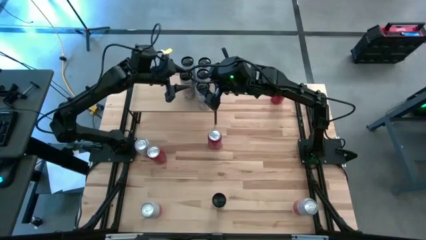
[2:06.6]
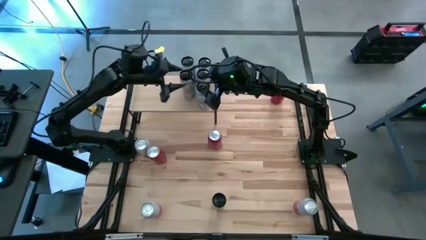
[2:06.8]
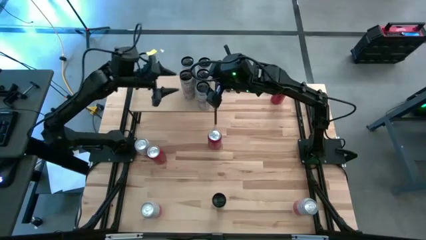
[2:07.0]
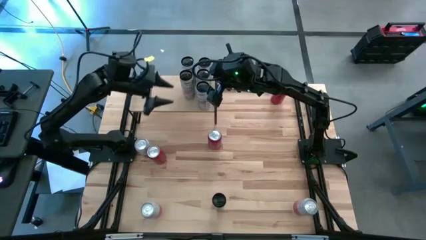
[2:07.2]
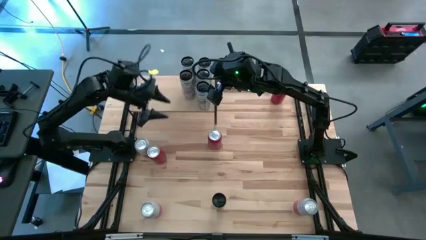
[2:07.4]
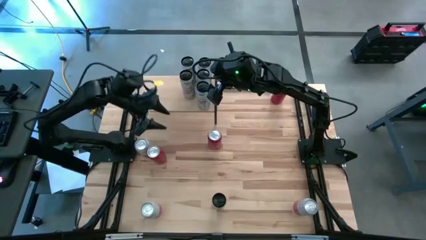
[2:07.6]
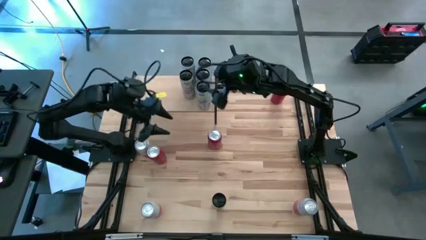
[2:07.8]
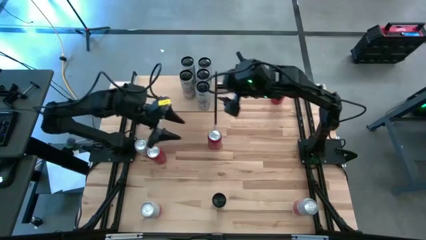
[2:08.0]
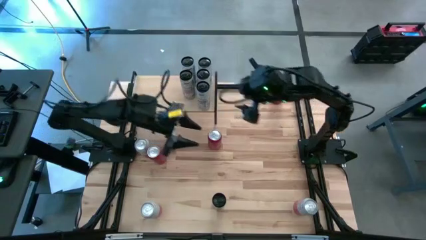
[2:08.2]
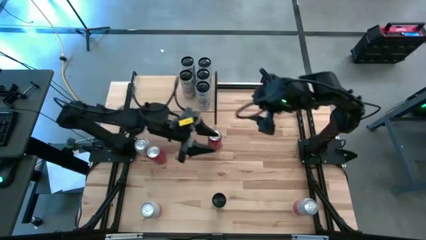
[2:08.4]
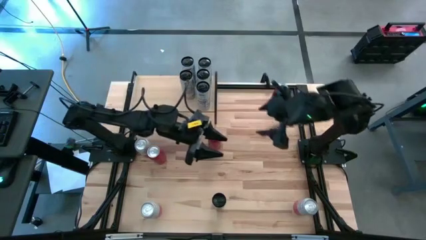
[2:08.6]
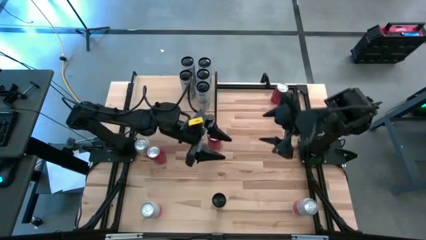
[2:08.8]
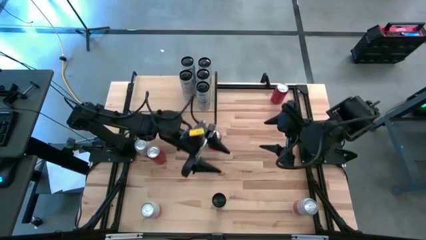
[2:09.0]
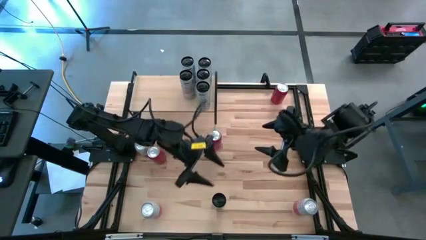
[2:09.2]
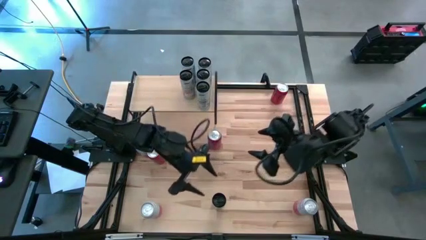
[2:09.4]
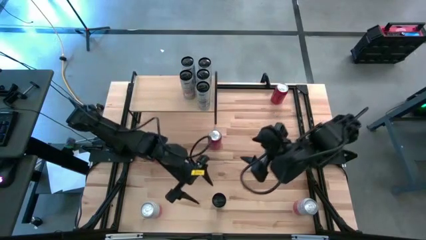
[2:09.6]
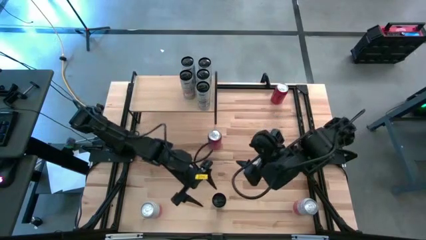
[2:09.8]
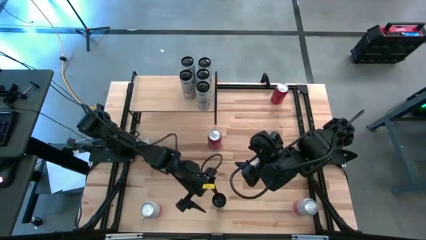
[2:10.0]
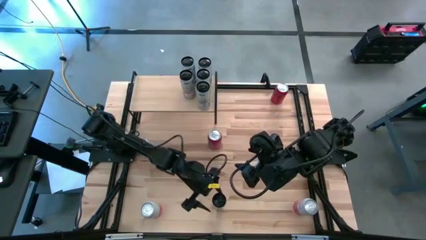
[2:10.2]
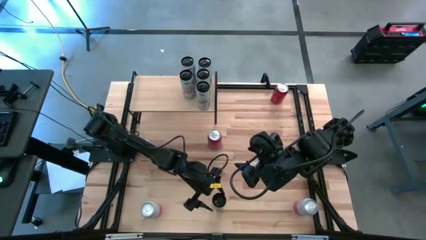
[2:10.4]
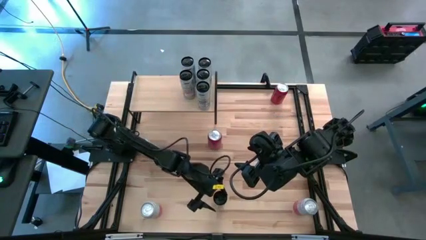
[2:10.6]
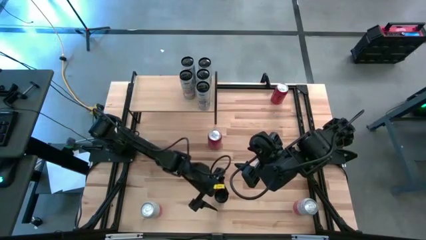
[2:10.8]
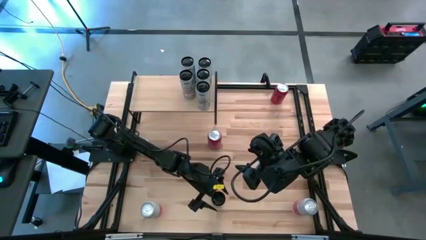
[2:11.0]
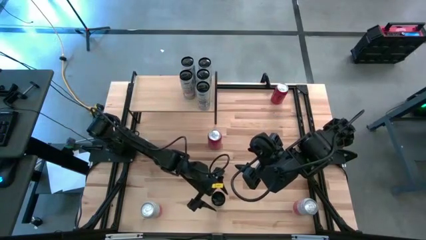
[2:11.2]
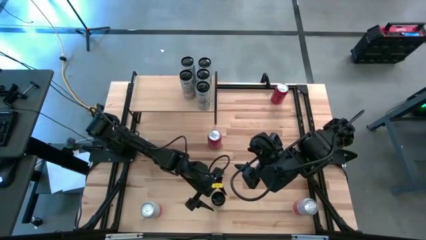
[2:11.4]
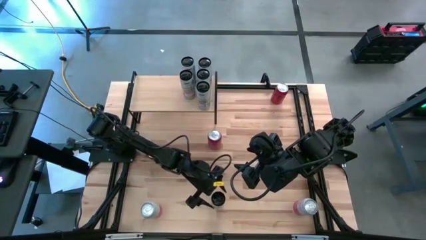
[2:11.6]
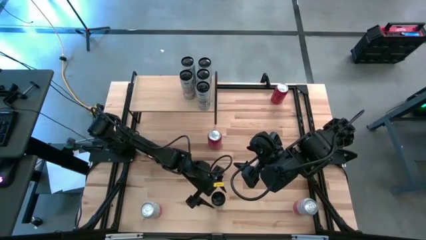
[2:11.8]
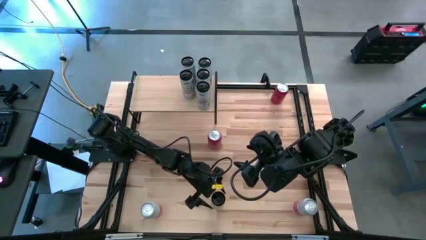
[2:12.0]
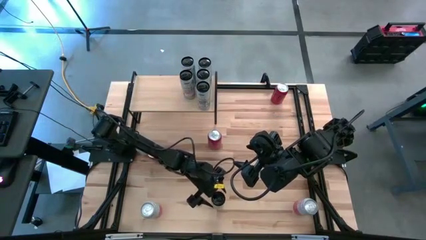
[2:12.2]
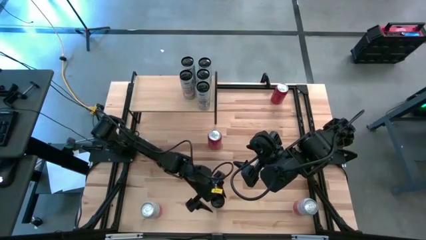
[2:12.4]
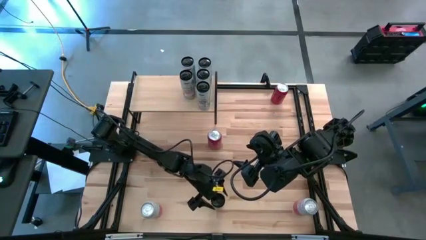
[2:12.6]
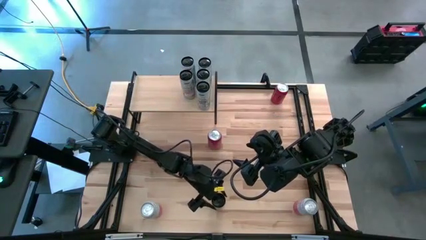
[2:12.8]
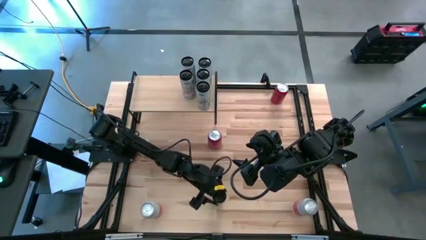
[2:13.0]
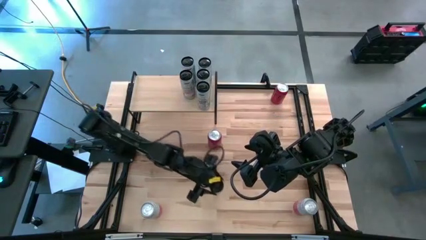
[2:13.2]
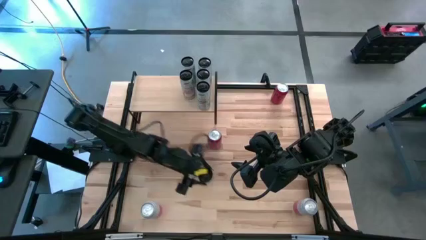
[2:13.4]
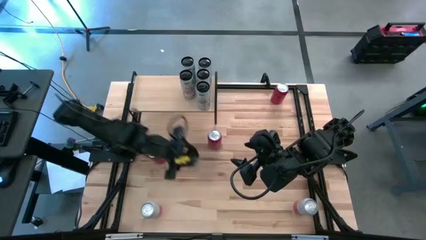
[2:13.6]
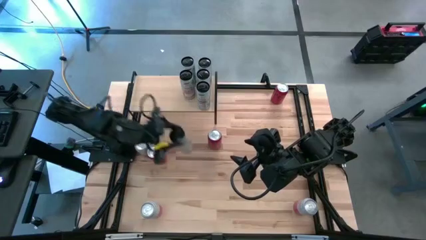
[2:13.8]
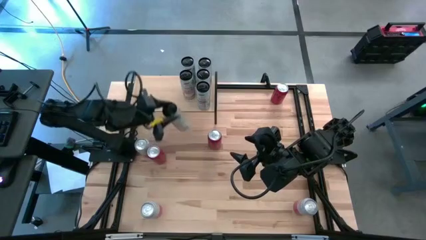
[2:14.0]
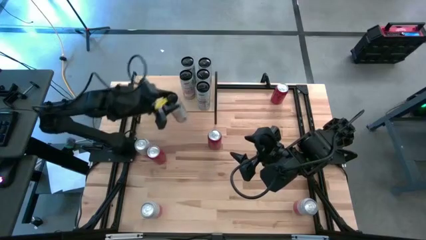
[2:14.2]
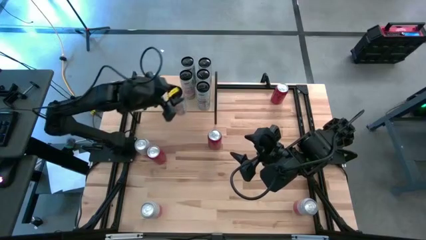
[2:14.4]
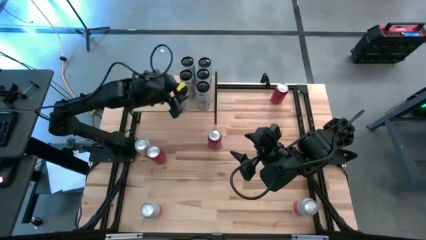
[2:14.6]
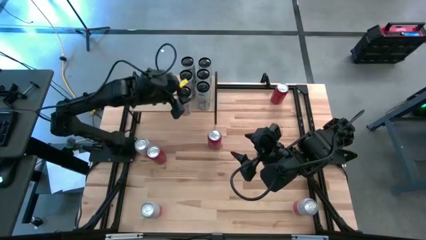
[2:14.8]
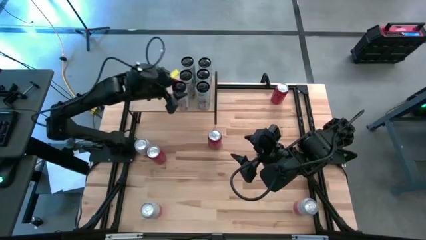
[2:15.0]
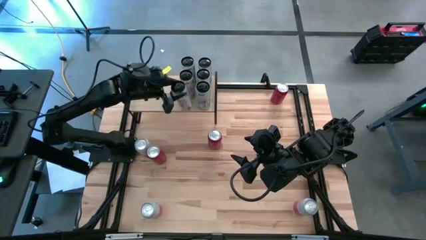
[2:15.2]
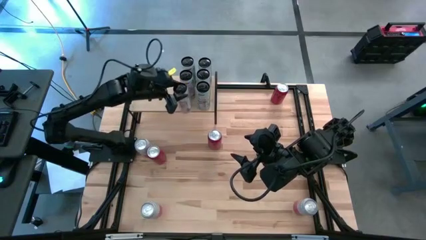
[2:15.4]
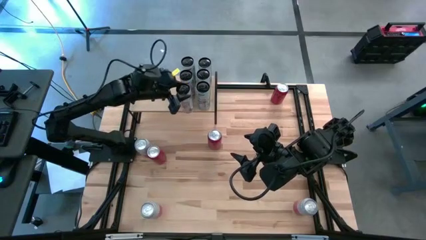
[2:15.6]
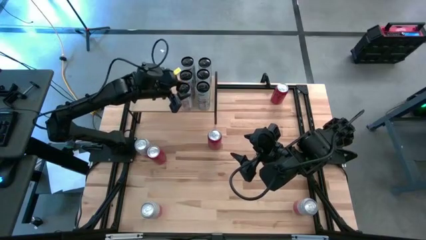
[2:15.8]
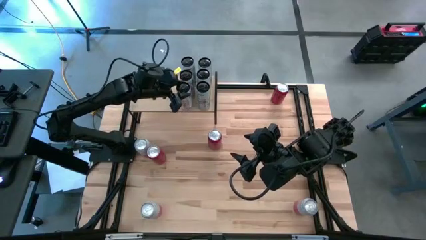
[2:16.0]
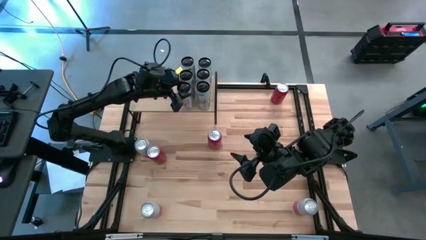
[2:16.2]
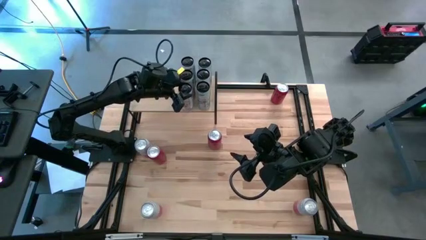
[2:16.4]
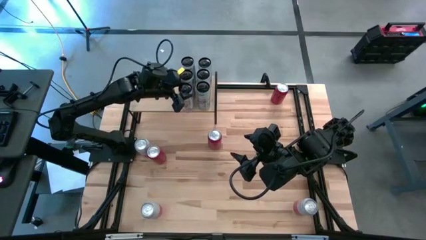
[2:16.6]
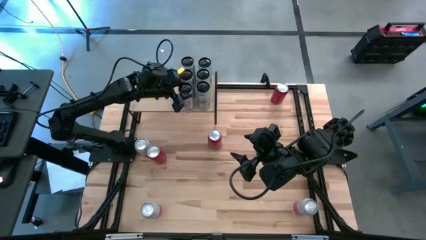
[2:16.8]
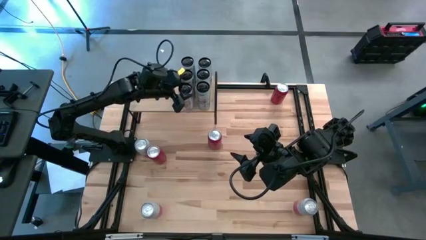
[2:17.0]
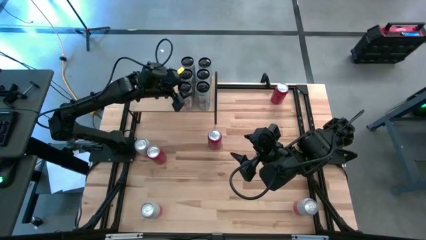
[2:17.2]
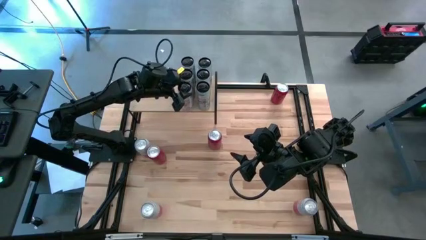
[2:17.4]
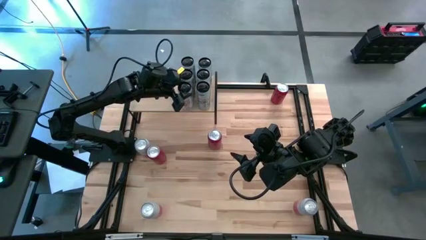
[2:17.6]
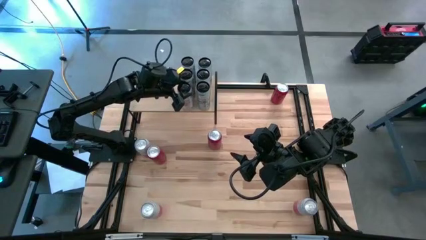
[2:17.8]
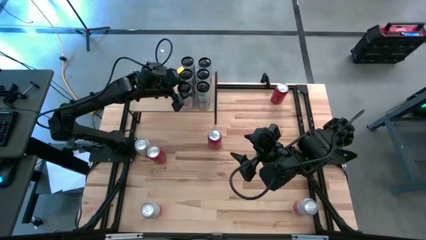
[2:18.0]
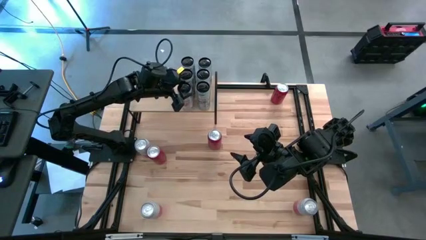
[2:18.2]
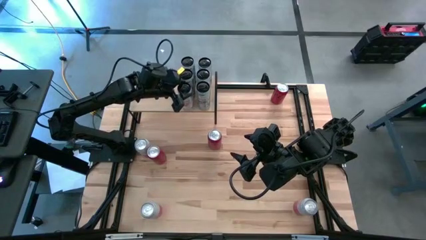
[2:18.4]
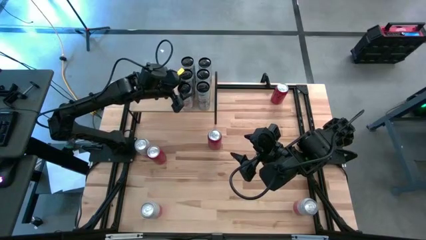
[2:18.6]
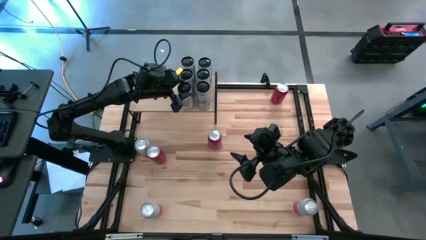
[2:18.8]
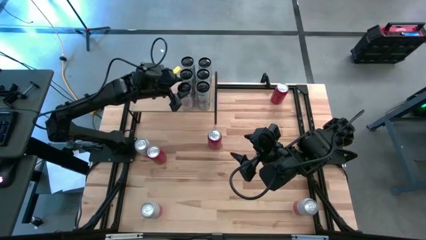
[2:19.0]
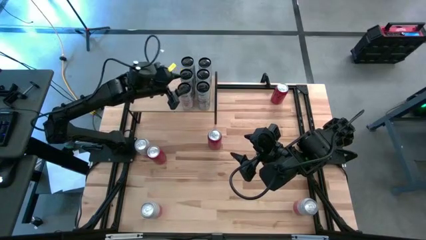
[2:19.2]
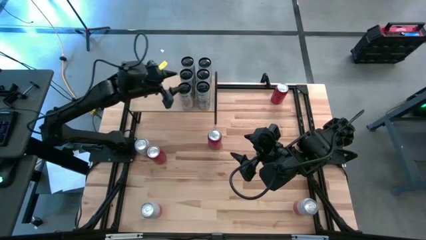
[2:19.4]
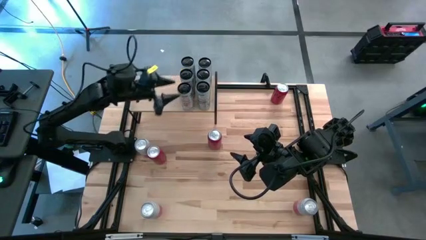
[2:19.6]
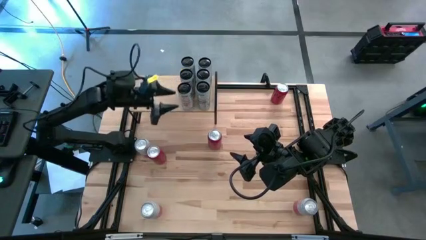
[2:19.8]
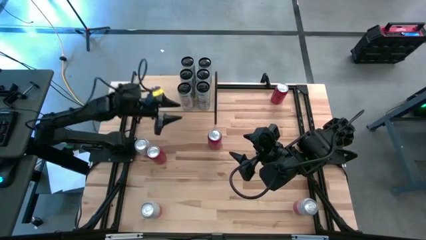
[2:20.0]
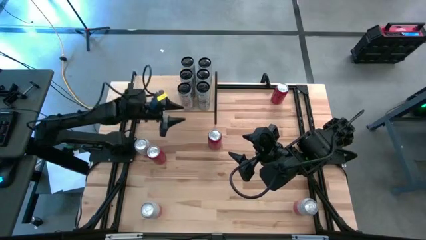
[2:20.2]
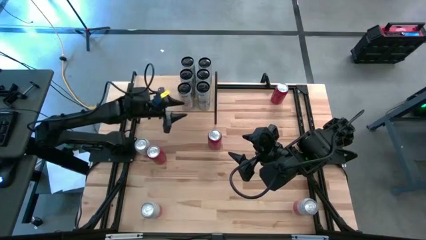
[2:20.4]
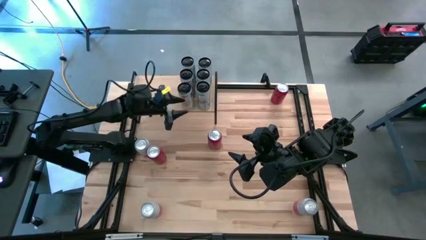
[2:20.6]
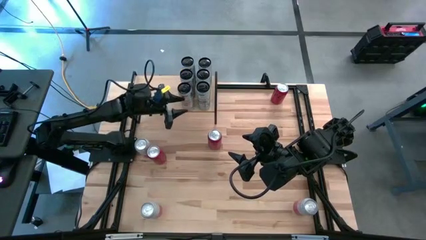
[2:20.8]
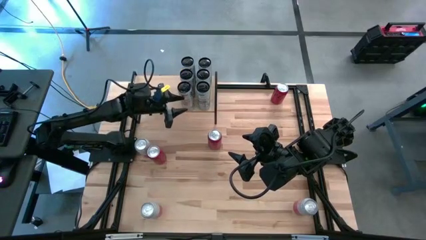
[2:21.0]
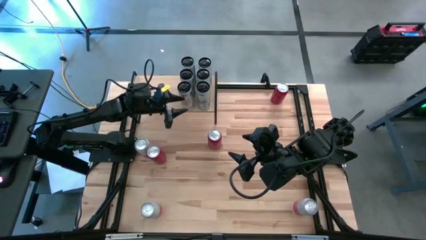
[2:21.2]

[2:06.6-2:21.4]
Task: Place canned beverage on shelf
Put the pink soda can on the shelf aligned with the other pink soda cans
